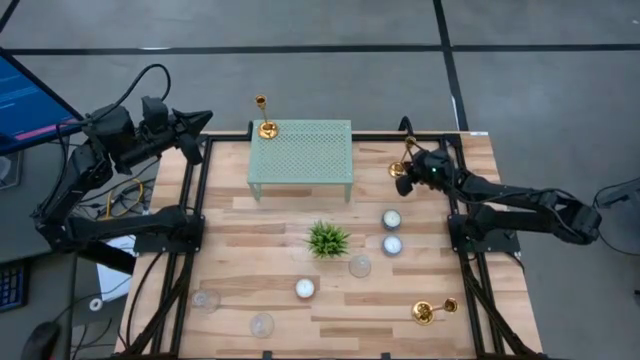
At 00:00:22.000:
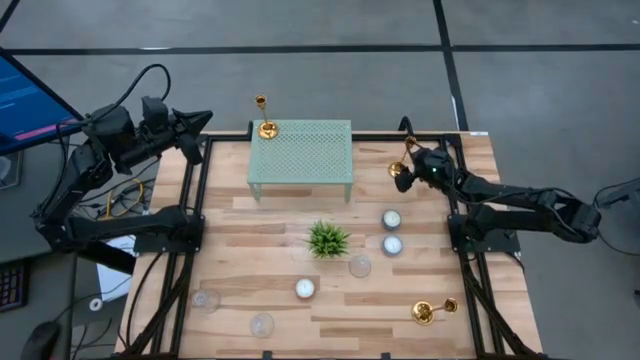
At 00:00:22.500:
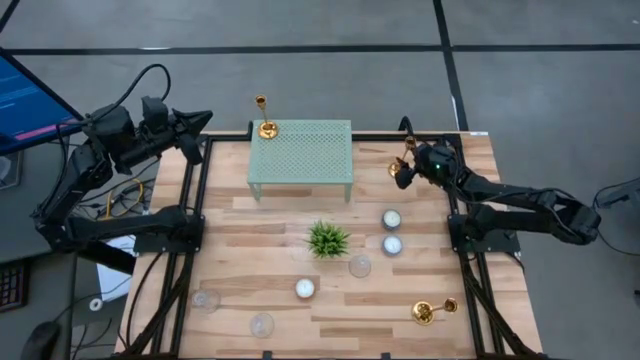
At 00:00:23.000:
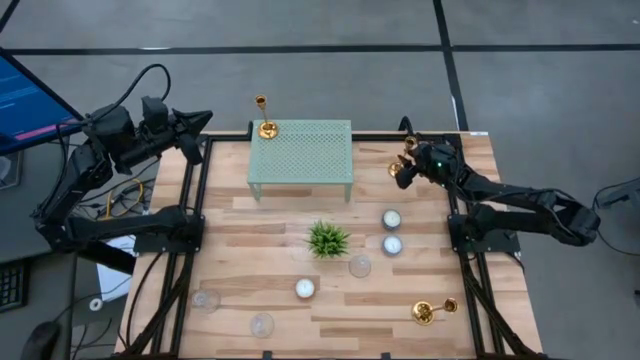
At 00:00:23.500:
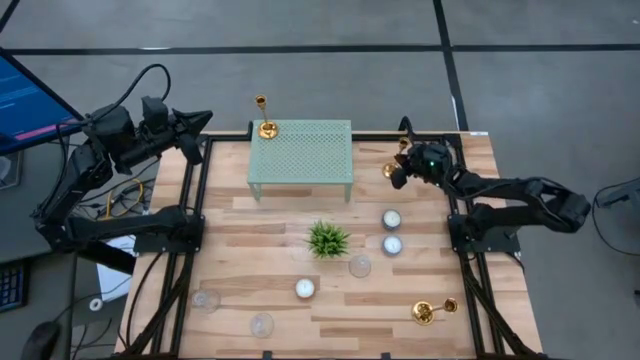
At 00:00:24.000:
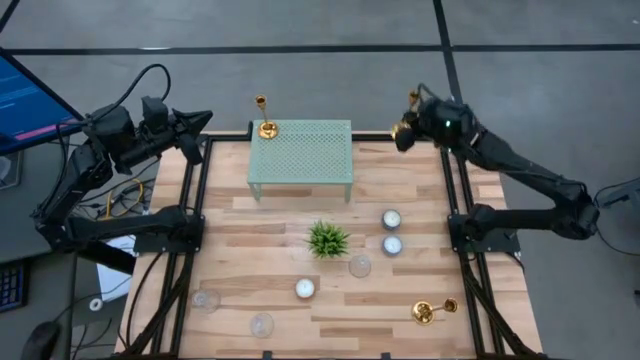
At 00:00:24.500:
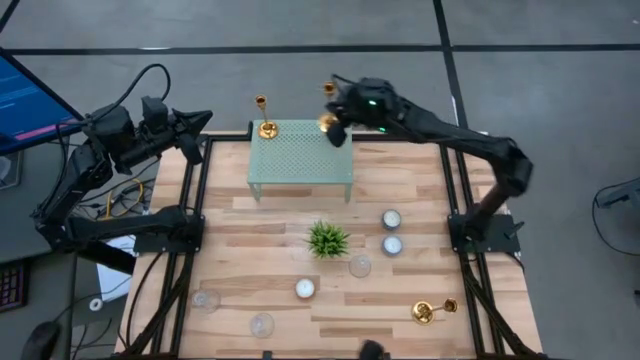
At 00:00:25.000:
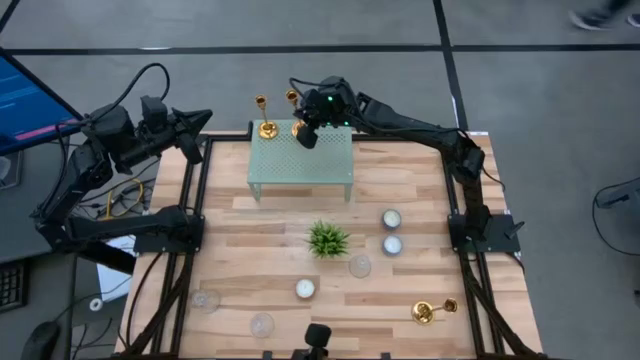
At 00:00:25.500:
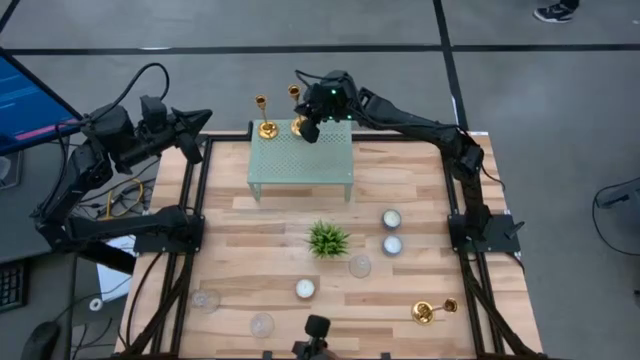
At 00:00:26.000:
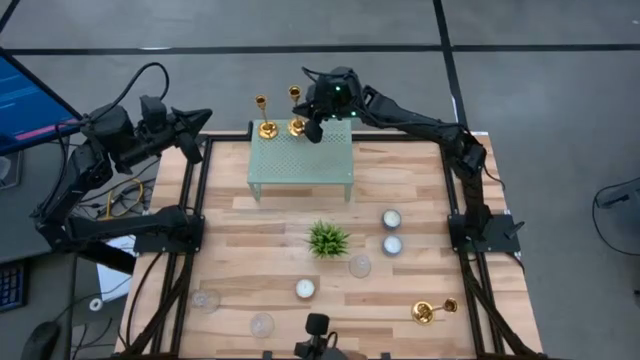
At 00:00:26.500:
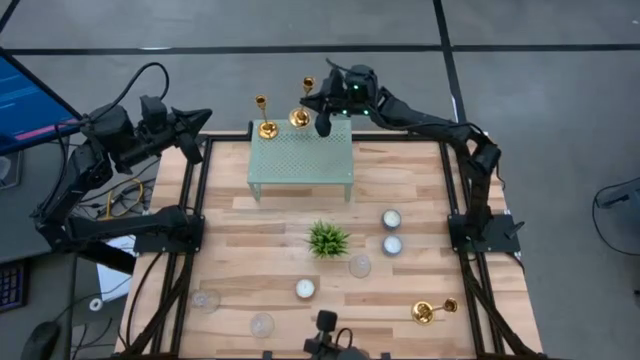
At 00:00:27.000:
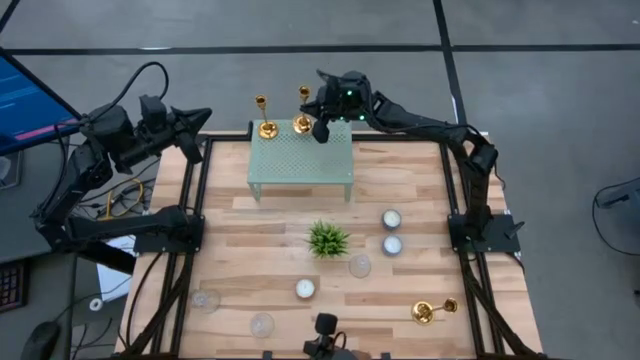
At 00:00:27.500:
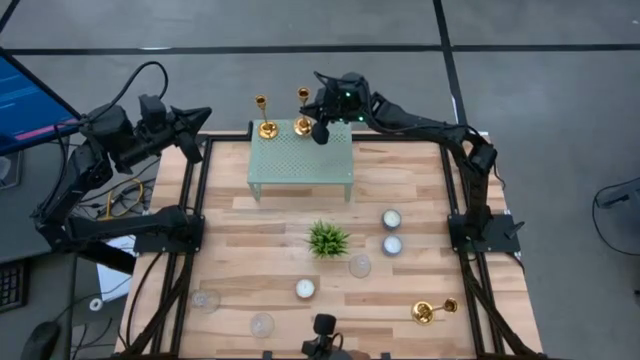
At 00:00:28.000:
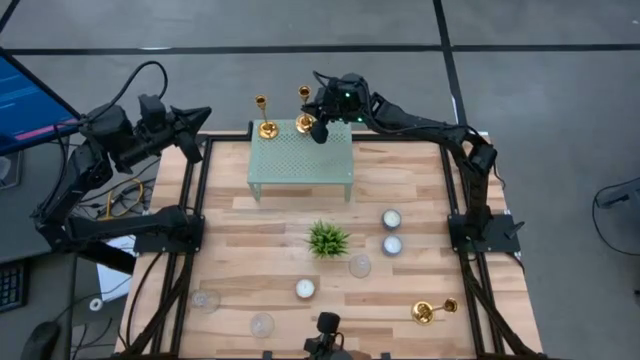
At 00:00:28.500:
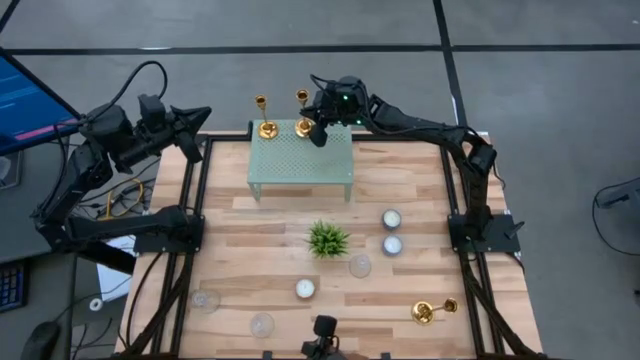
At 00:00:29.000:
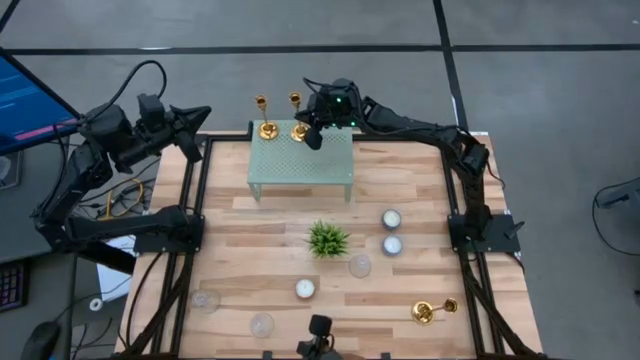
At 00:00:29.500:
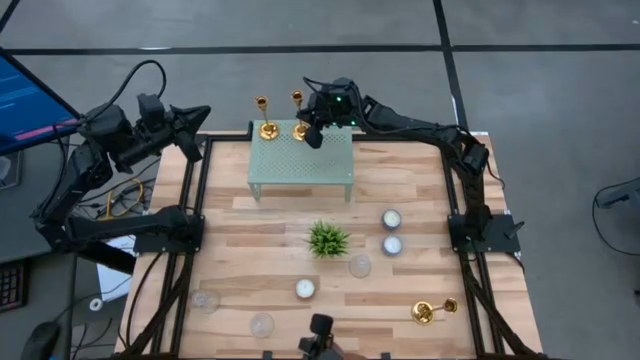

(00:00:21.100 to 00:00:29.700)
Task: Pick & Place candle stick holders
Put the top gold candle holder on the shelf aligned with the other gold candle holder

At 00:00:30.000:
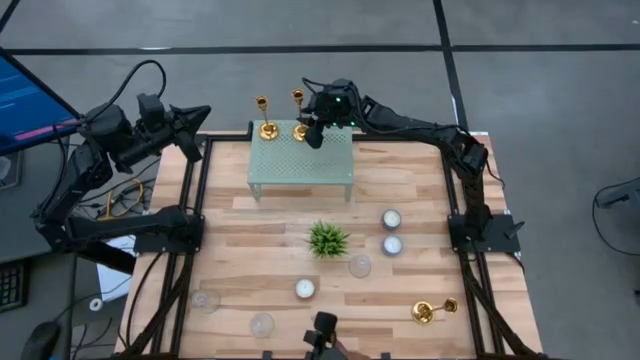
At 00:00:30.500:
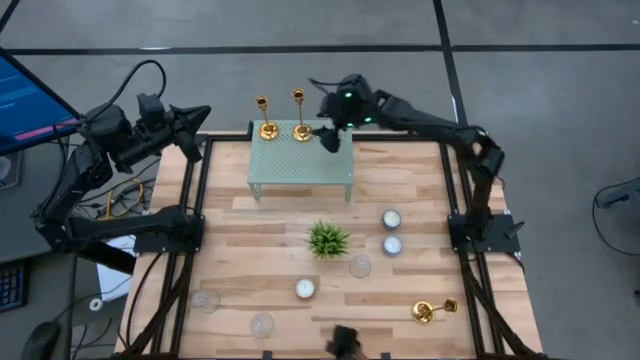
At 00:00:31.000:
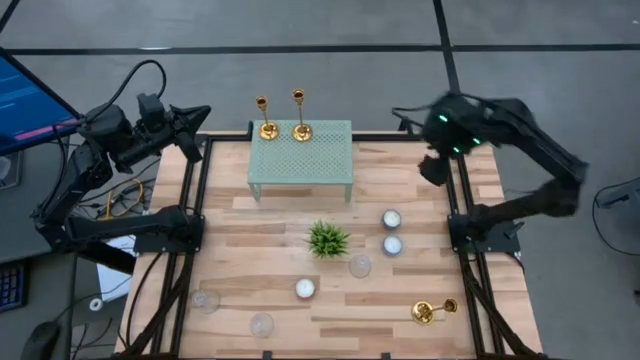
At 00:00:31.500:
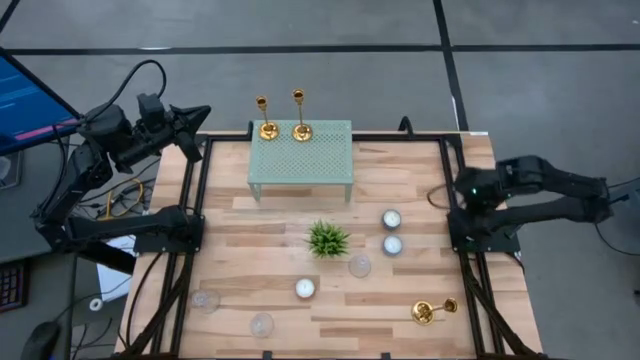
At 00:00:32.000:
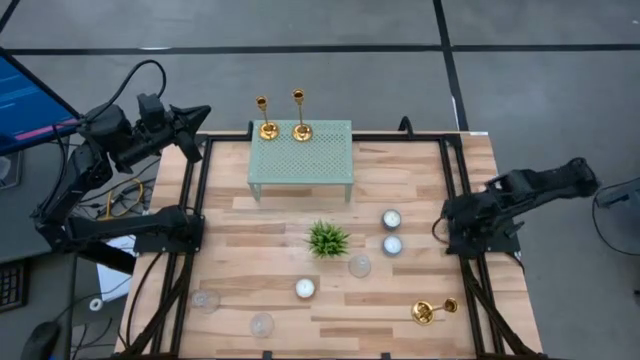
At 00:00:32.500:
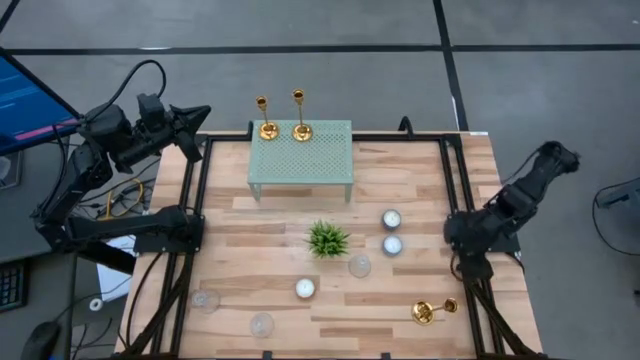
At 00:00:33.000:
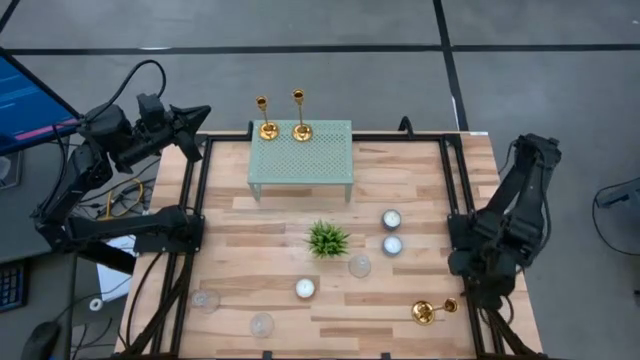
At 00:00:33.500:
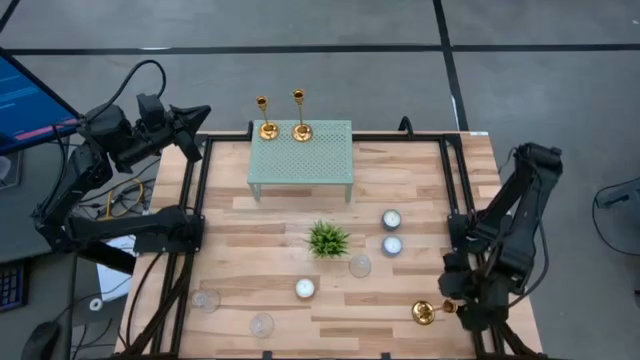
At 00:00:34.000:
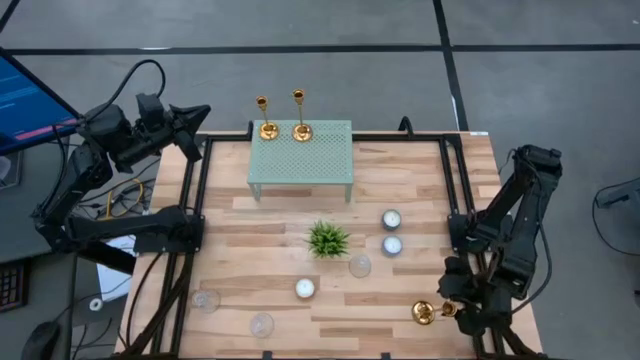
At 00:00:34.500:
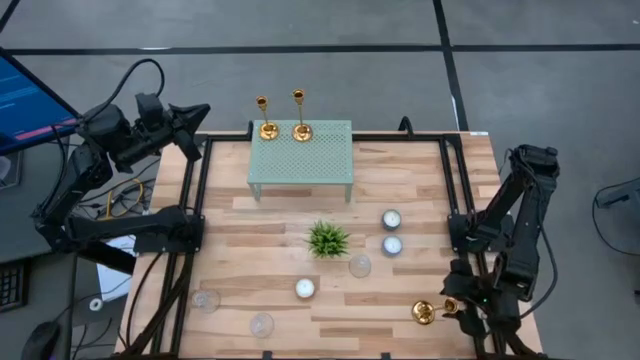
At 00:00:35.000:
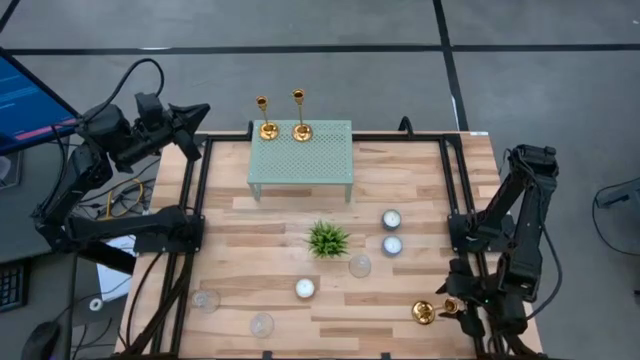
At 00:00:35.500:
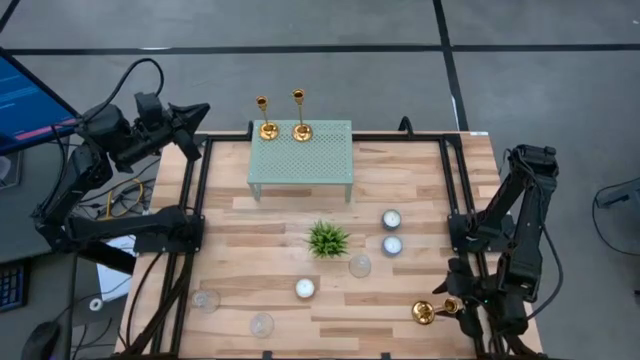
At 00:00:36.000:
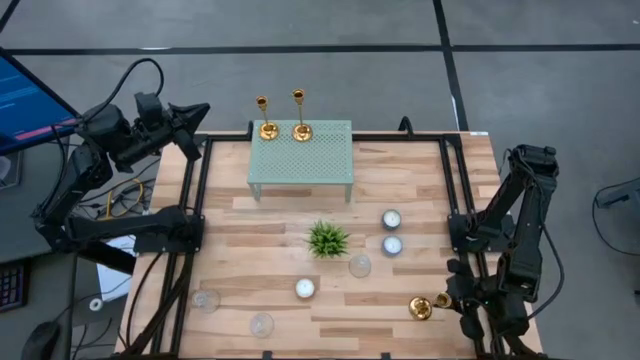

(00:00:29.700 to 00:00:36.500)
Put the gold candle holder on the shelf aligned with the other gold candle holder

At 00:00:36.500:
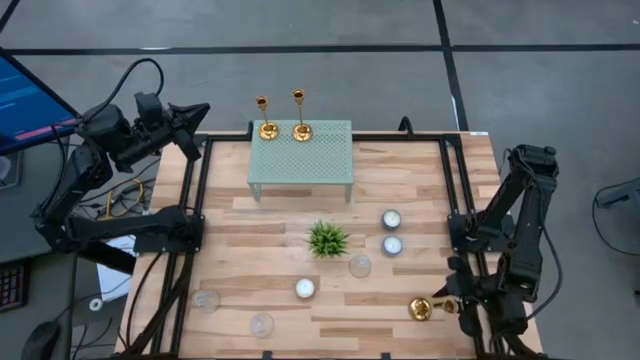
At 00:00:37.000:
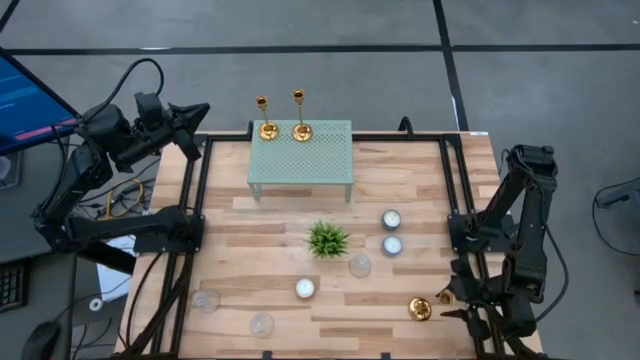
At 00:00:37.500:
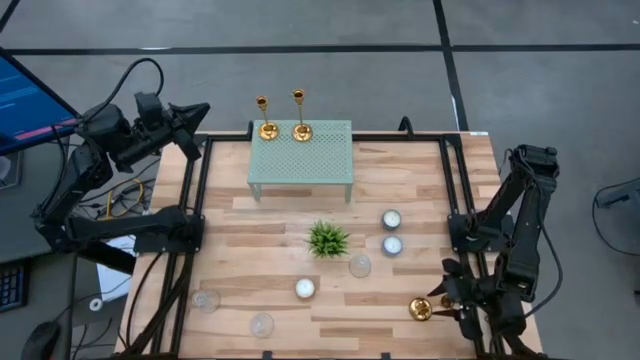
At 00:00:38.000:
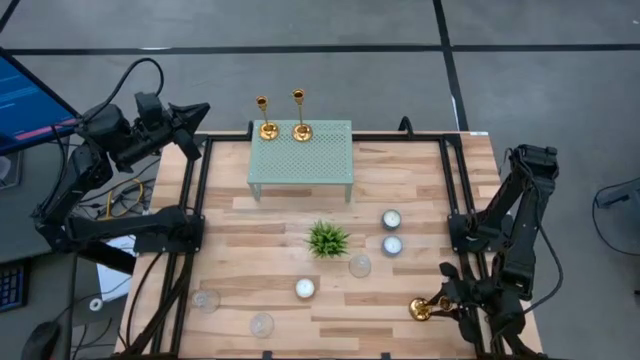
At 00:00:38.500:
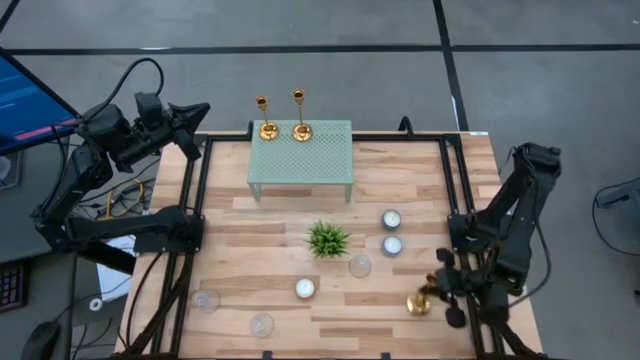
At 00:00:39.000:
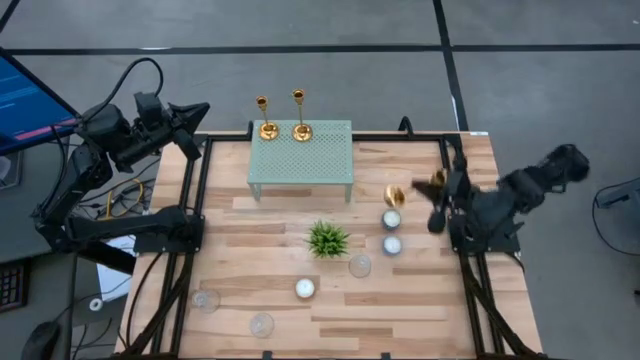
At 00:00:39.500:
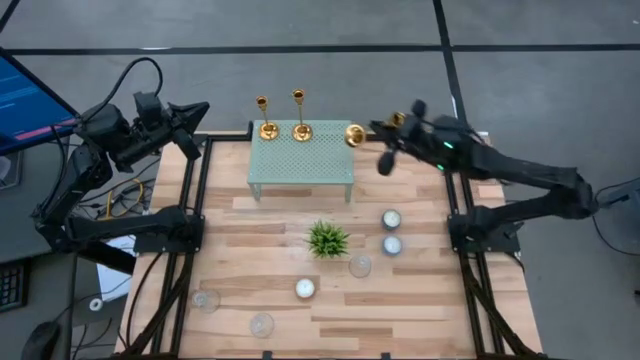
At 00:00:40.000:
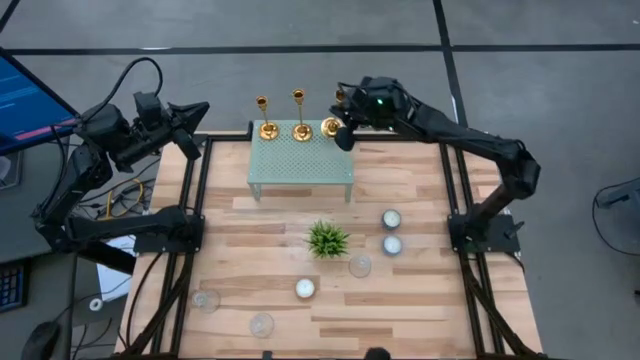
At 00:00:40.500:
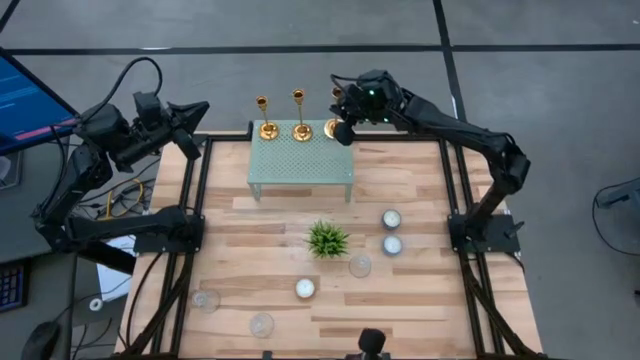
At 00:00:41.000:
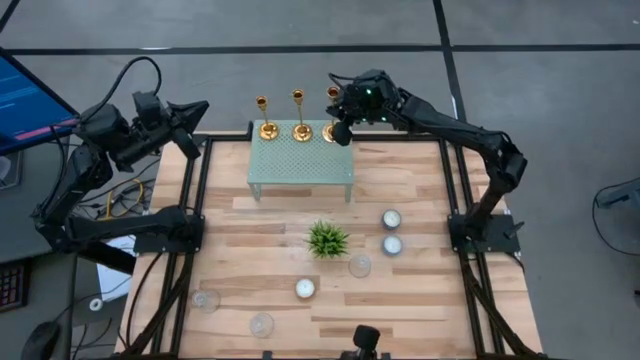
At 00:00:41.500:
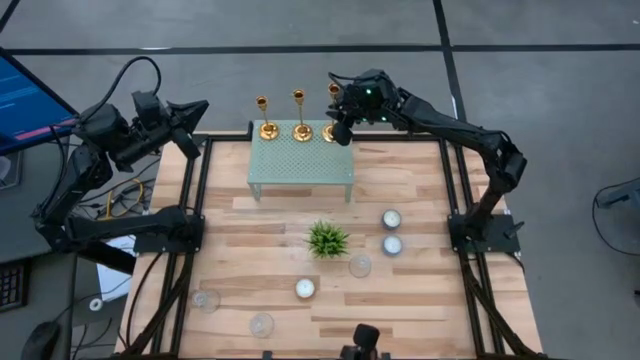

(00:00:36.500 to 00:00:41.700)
Put the gold candle holder on the shelf aligned with the other gold candle holders
